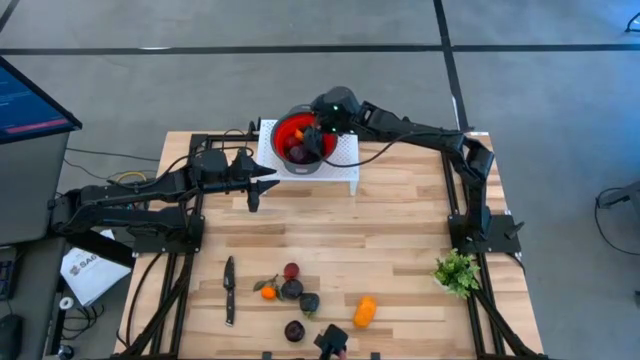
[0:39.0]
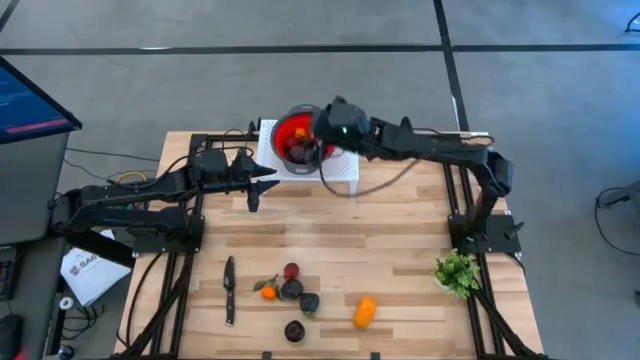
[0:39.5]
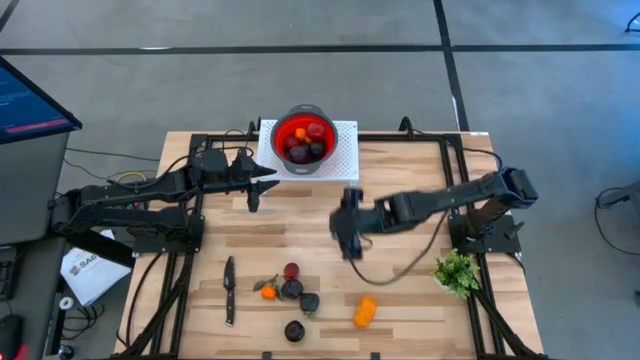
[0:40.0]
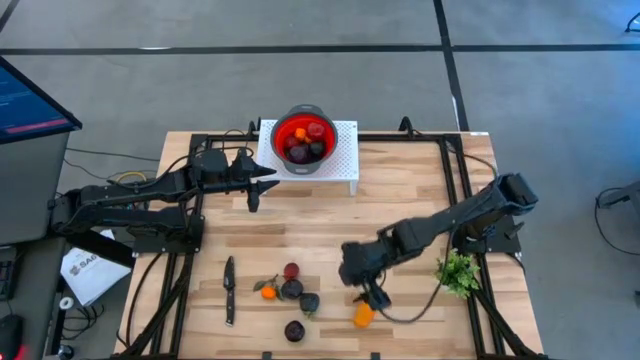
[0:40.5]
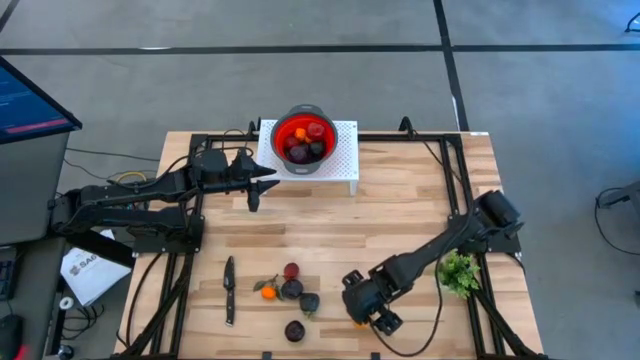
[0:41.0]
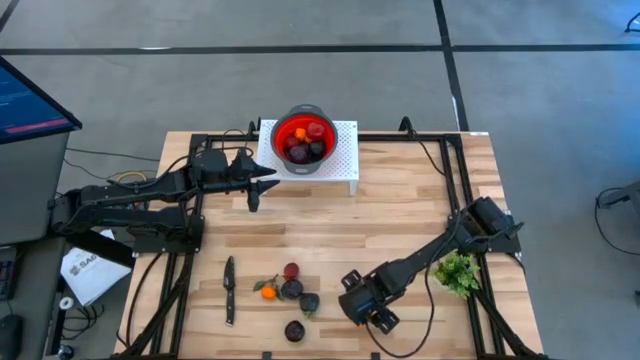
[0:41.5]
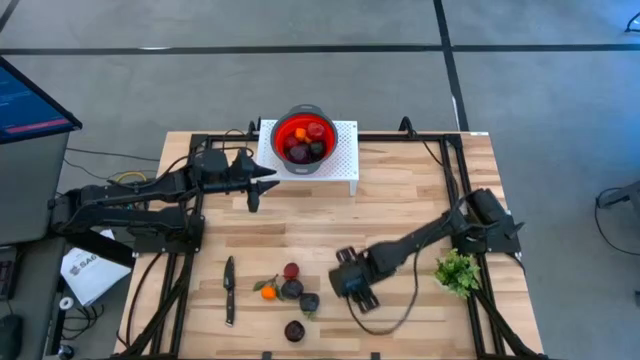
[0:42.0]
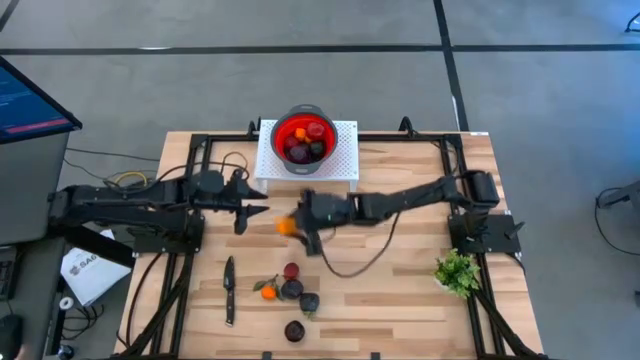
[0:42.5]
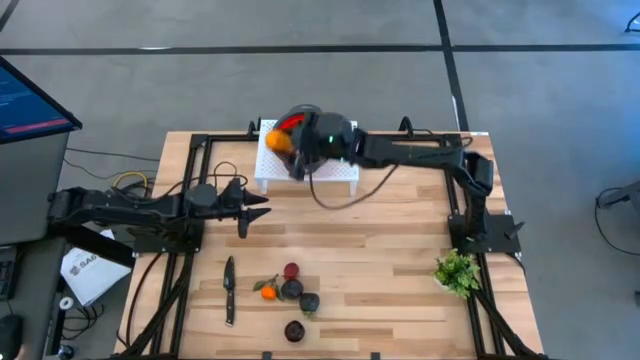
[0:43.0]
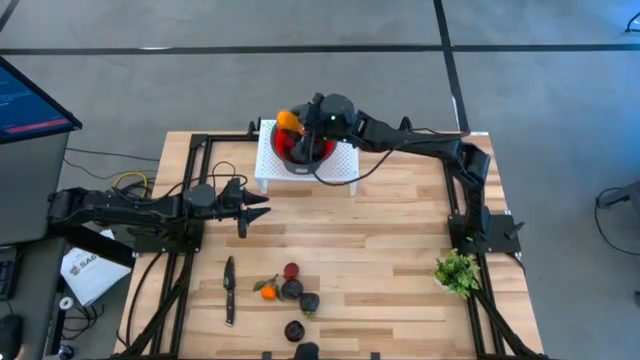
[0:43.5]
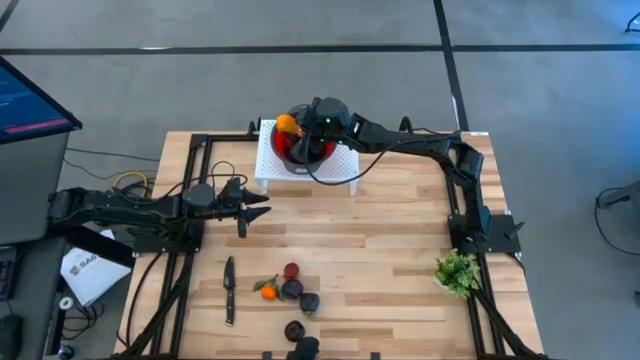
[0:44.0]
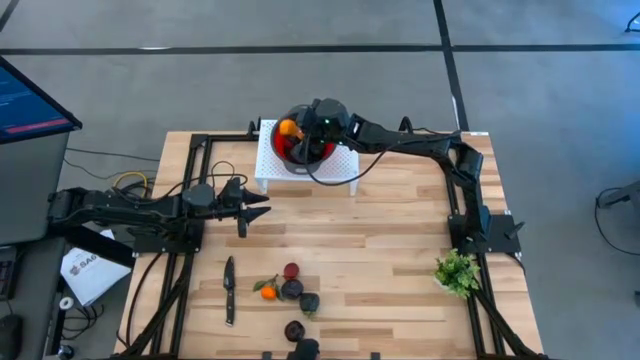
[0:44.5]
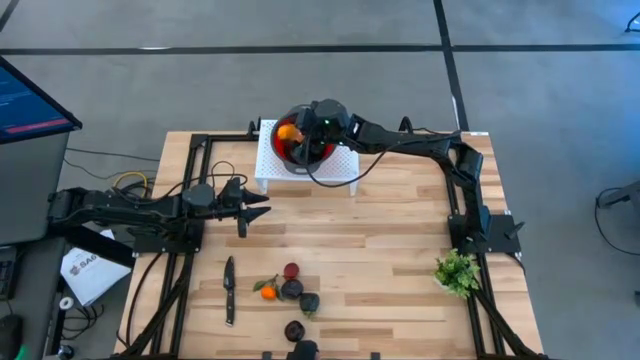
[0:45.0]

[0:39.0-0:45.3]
Task: Pick & Place Fruit
Put the mango into the red strainer bowl

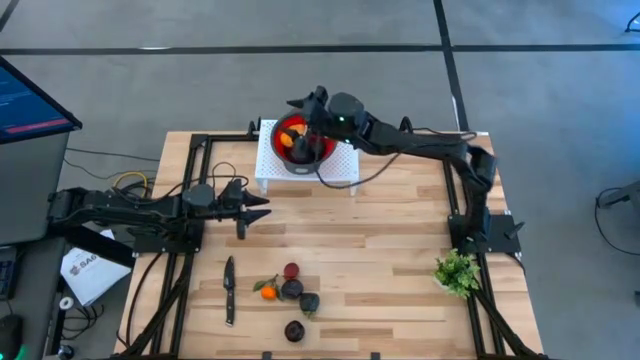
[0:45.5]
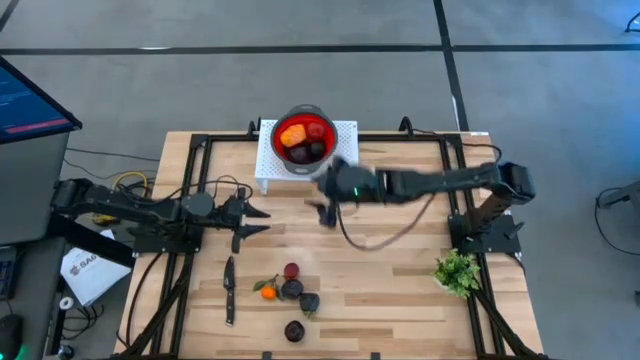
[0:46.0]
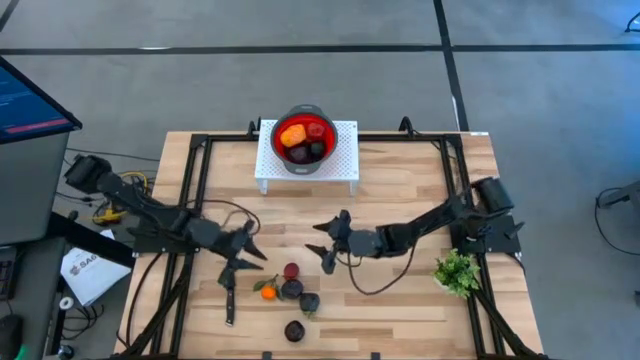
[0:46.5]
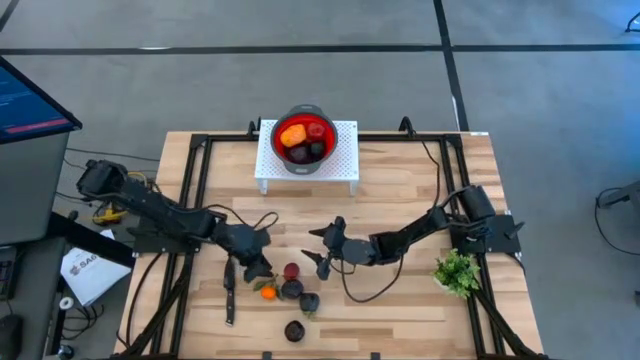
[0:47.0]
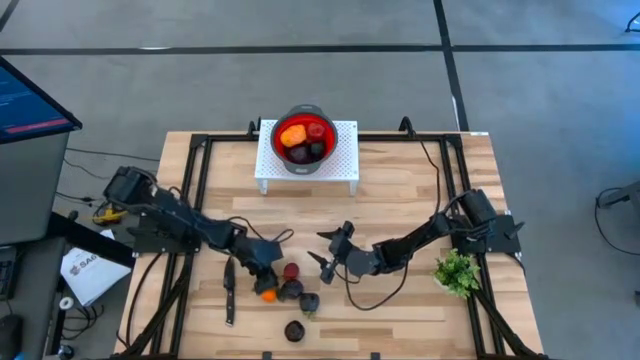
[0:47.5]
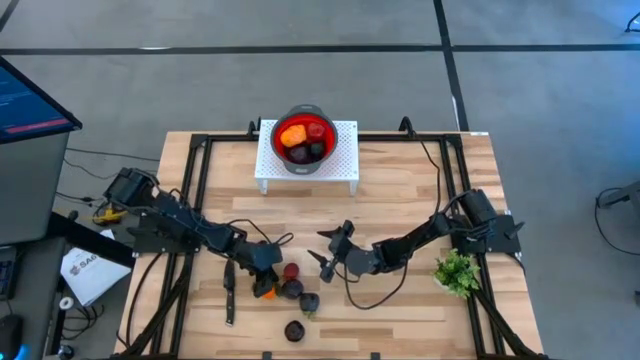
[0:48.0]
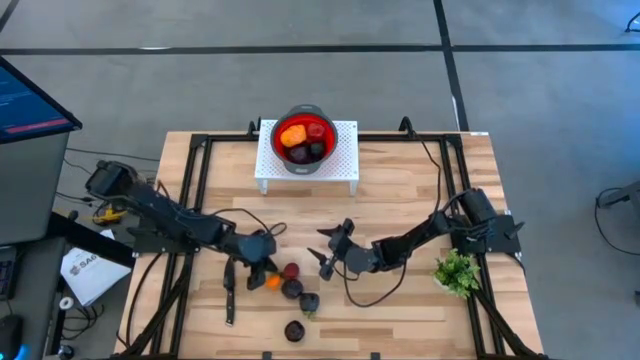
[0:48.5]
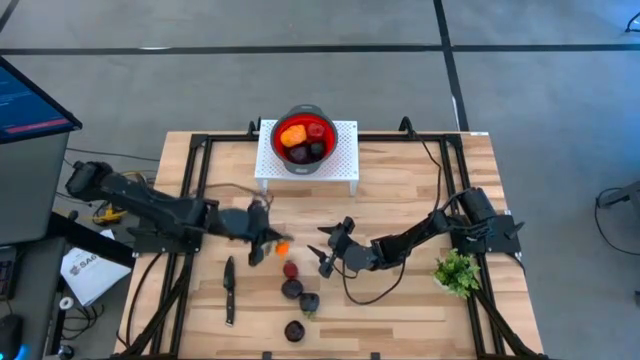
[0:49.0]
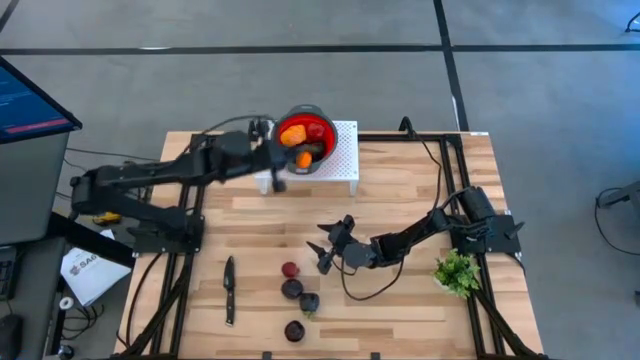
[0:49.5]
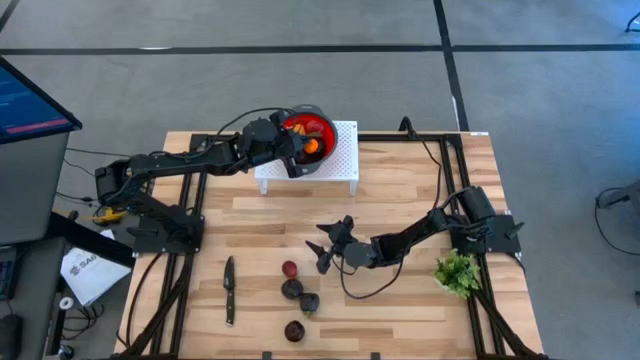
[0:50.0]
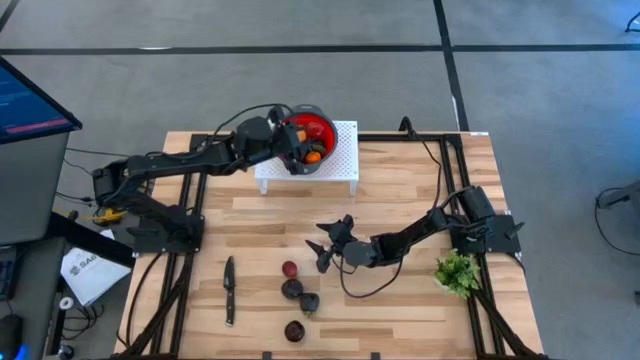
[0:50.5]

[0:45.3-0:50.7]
Put the orange into the red strainer bowl

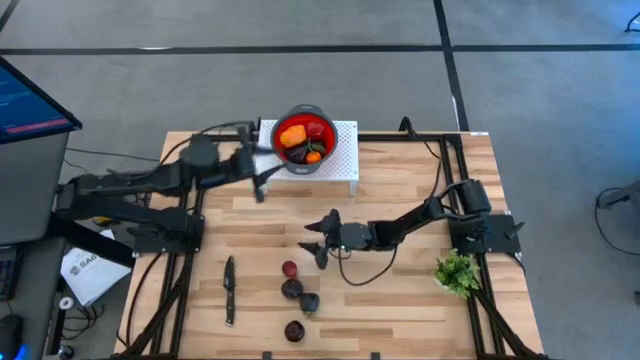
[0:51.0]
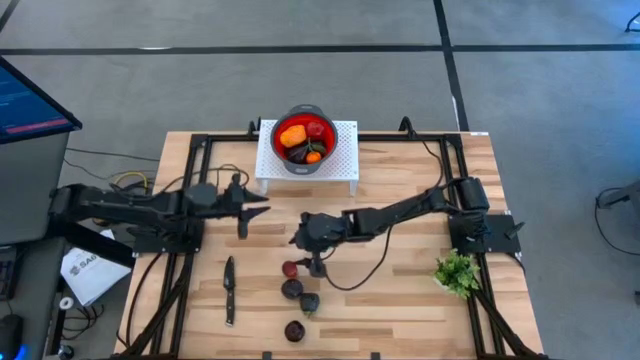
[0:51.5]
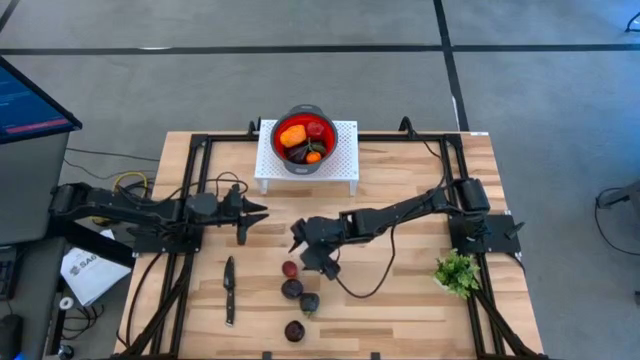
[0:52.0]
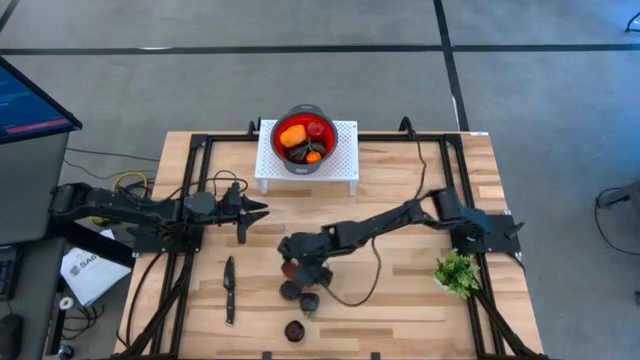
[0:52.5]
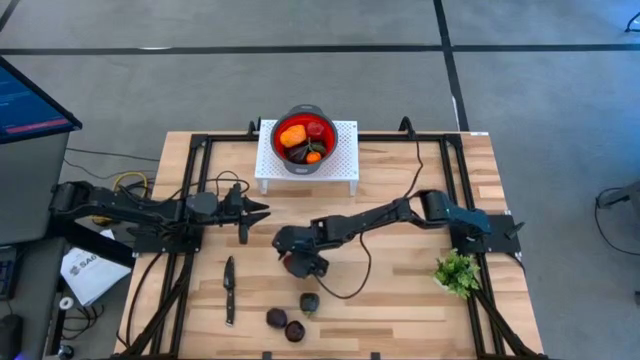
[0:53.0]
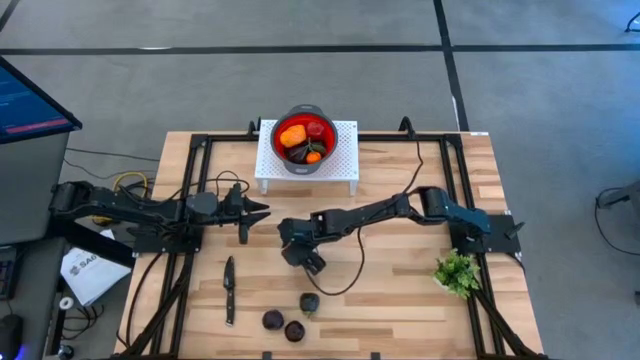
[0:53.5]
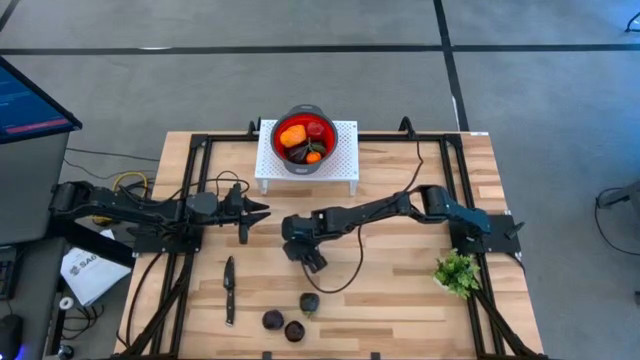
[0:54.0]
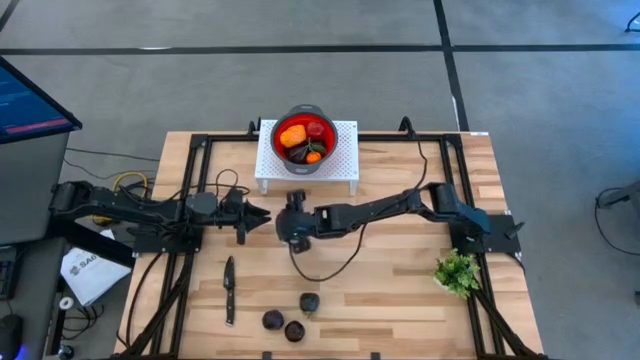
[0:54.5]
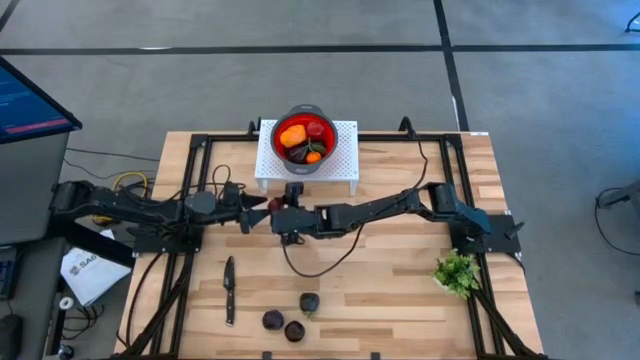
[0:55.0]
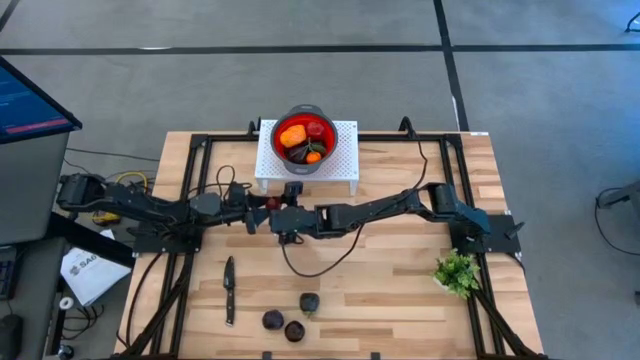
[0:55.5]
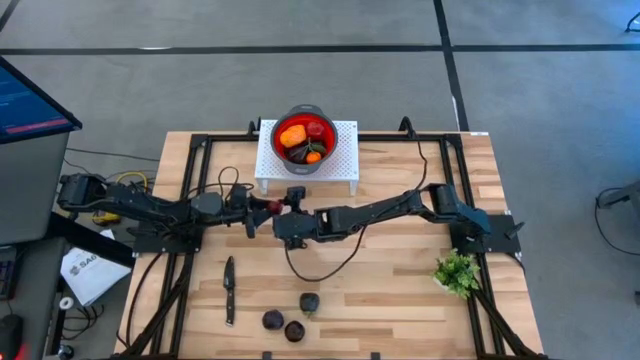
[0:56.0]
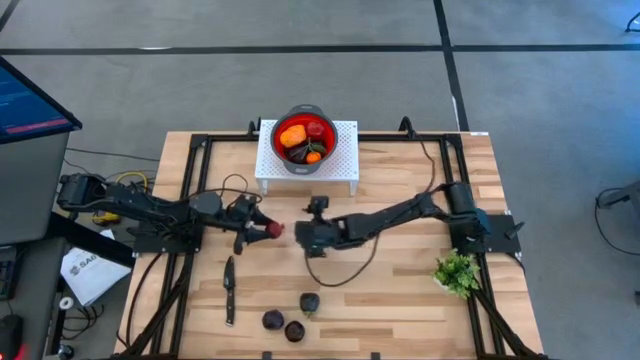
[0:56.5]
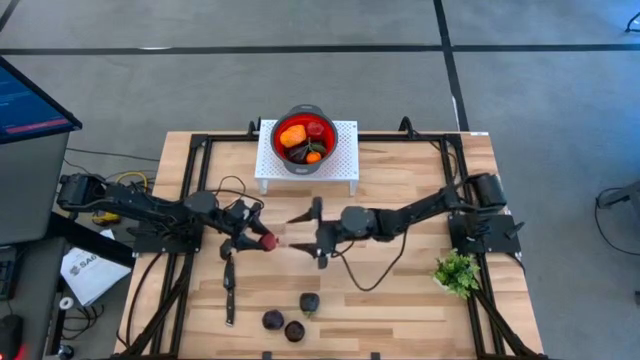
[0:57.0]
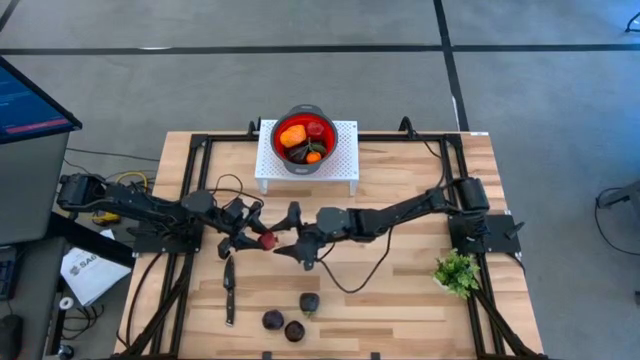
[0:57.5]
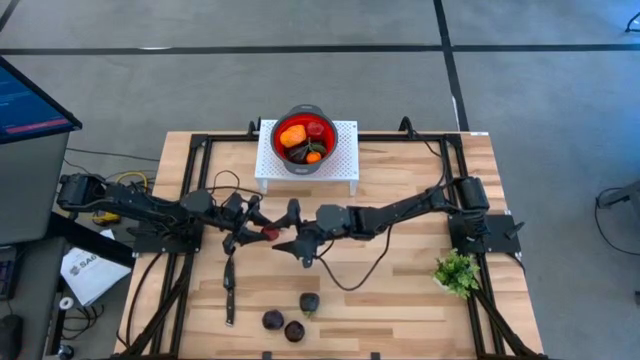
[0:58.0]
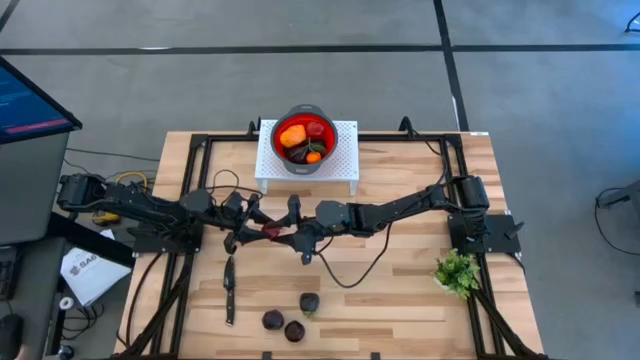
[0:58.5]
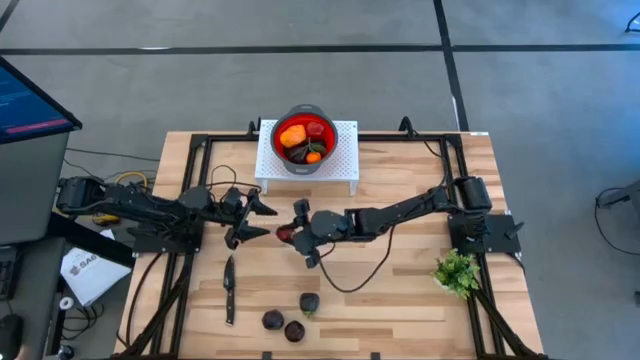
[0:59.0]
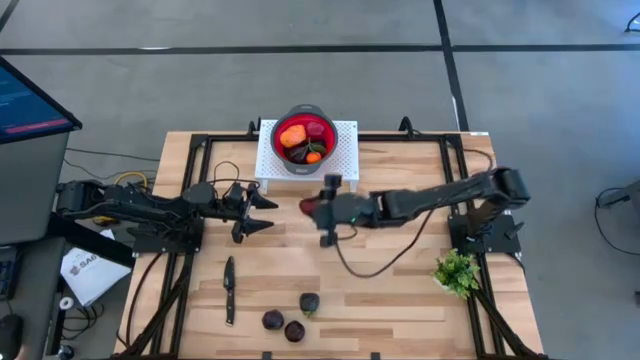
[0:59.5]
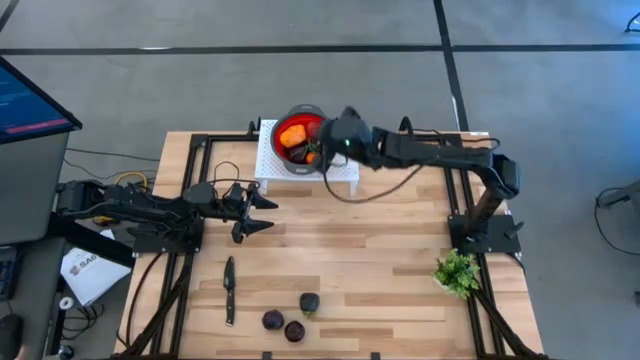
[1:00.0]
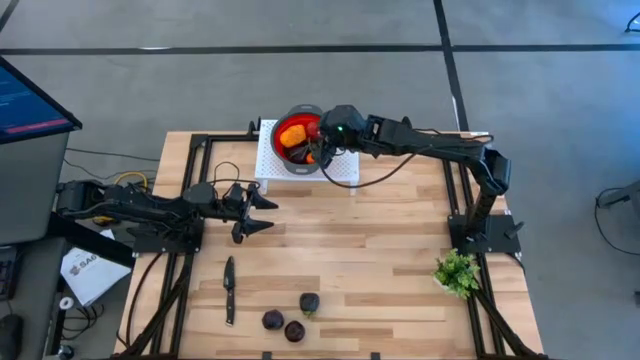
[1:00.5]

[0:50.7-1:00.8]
Put the pomegranate into the red strainer bowl
